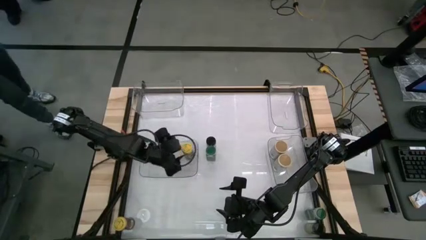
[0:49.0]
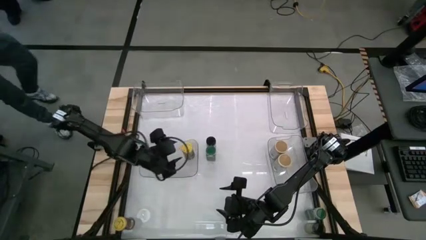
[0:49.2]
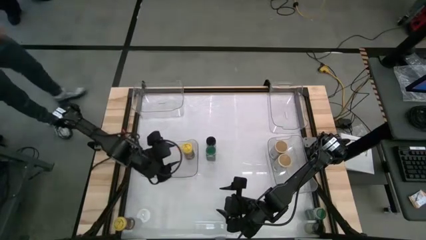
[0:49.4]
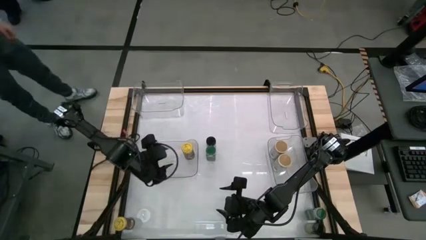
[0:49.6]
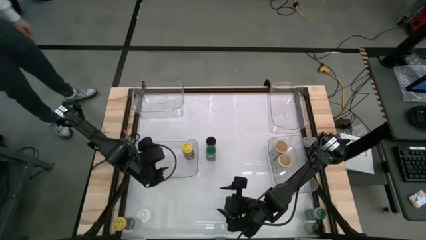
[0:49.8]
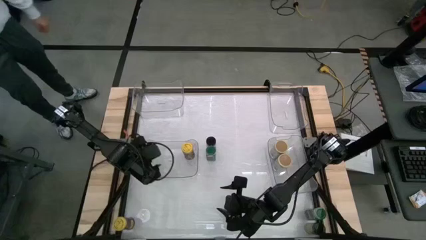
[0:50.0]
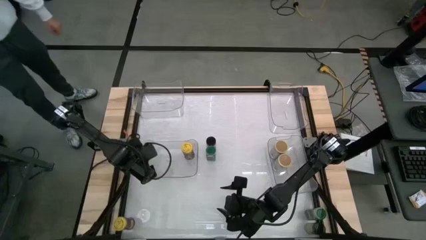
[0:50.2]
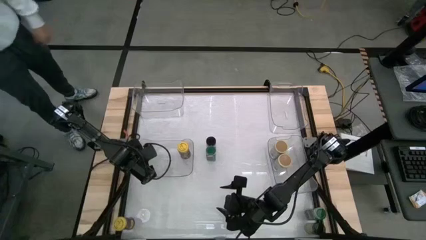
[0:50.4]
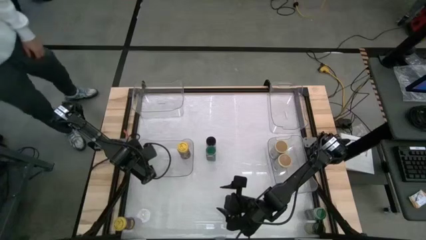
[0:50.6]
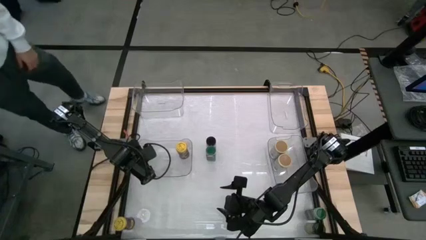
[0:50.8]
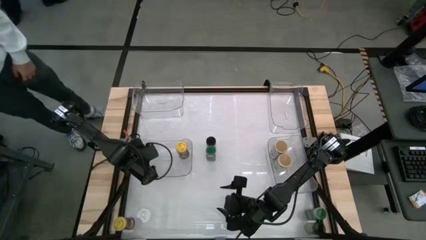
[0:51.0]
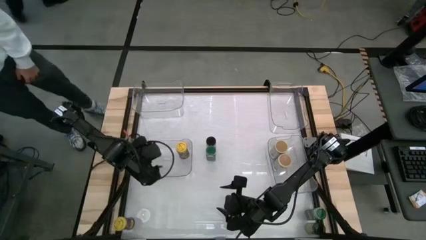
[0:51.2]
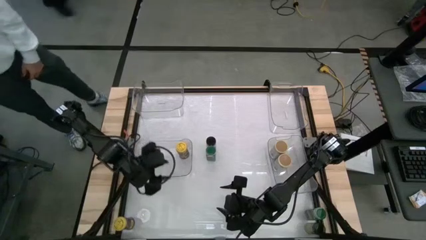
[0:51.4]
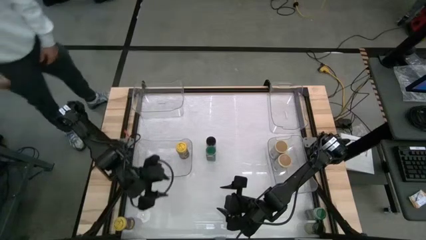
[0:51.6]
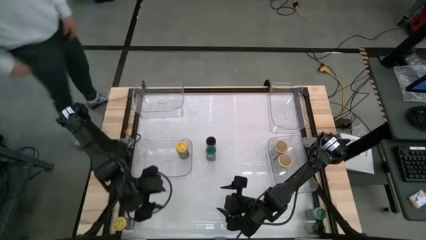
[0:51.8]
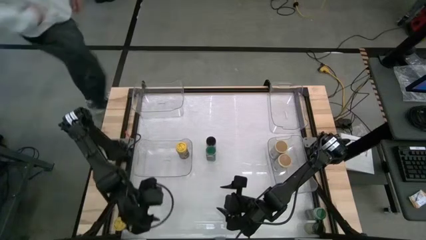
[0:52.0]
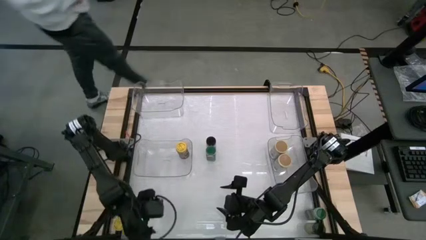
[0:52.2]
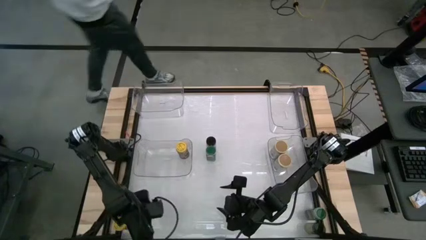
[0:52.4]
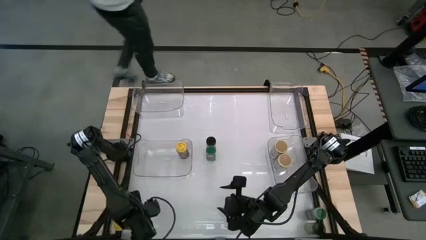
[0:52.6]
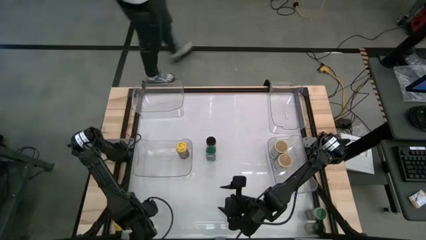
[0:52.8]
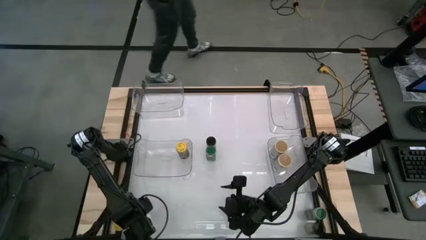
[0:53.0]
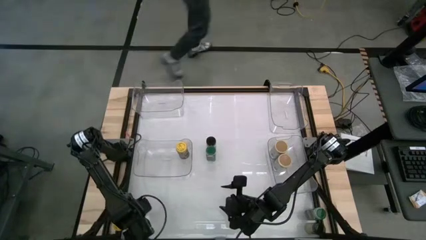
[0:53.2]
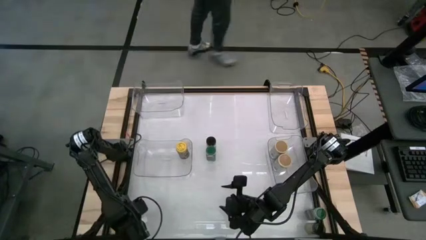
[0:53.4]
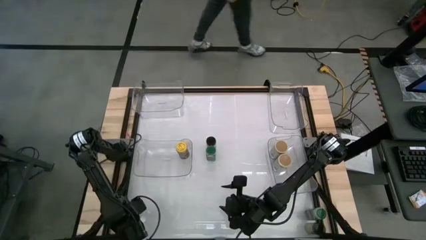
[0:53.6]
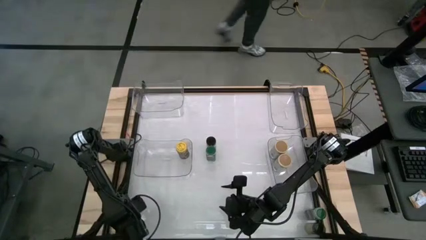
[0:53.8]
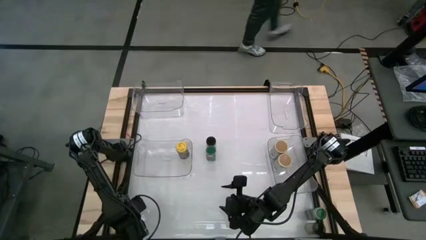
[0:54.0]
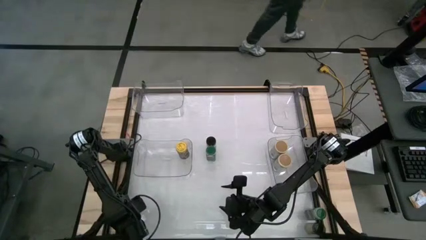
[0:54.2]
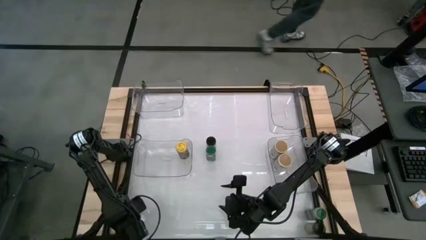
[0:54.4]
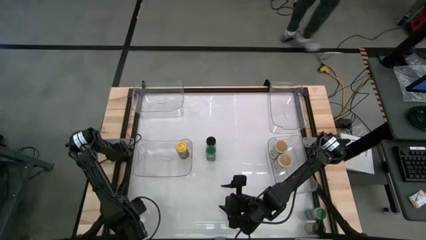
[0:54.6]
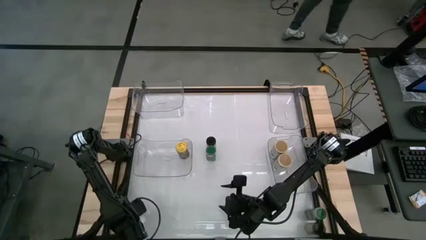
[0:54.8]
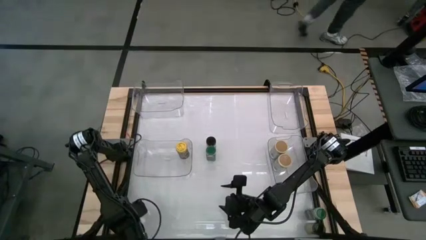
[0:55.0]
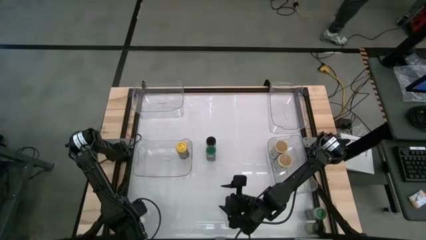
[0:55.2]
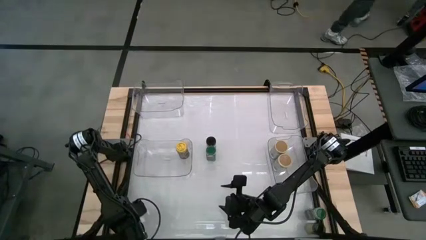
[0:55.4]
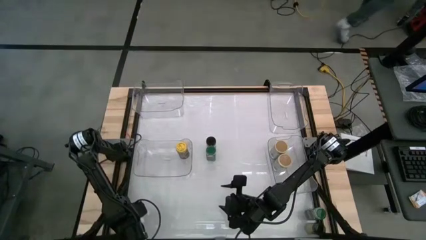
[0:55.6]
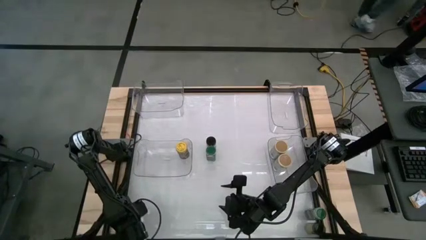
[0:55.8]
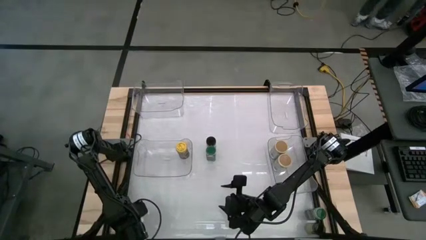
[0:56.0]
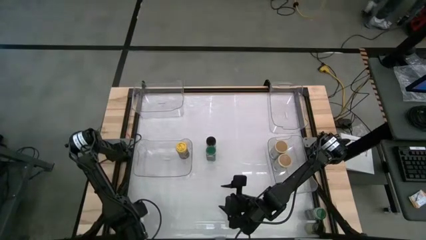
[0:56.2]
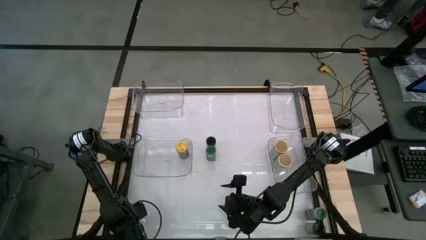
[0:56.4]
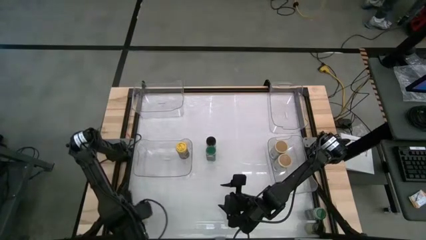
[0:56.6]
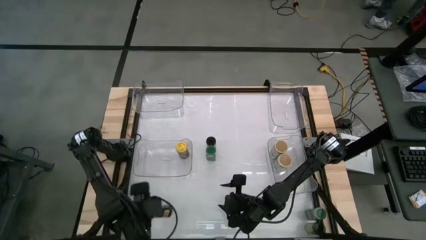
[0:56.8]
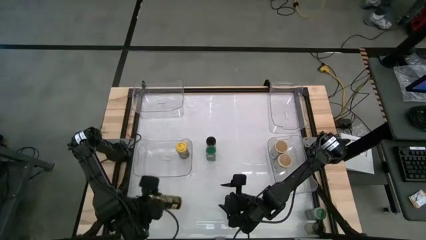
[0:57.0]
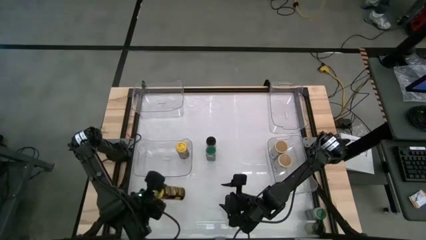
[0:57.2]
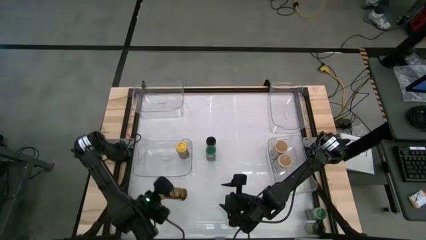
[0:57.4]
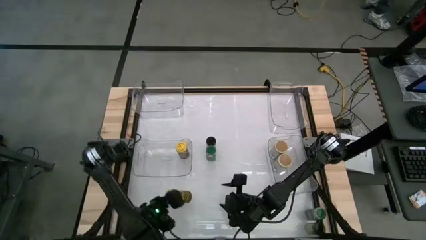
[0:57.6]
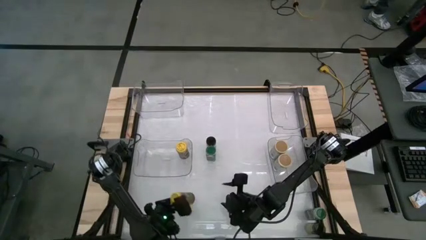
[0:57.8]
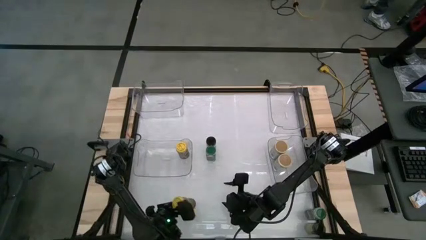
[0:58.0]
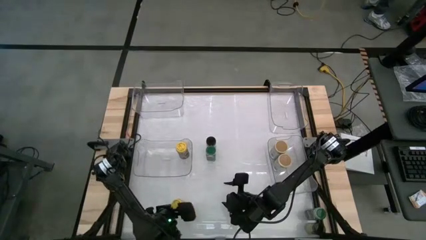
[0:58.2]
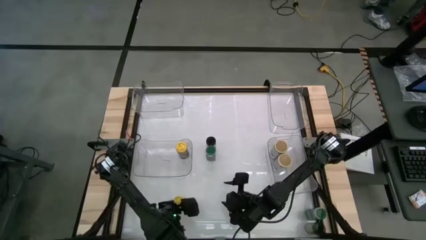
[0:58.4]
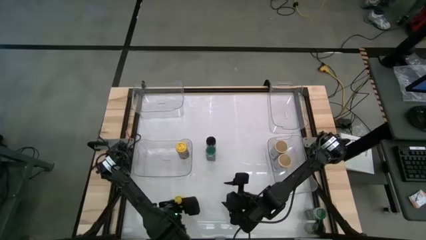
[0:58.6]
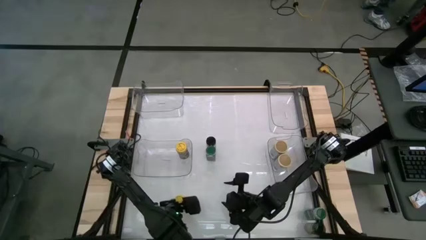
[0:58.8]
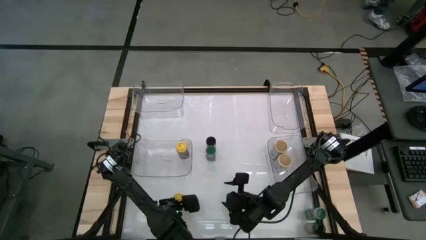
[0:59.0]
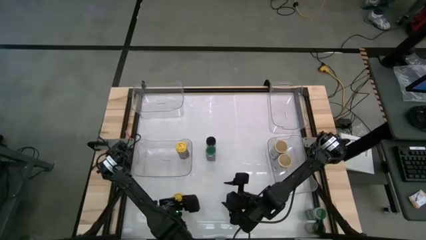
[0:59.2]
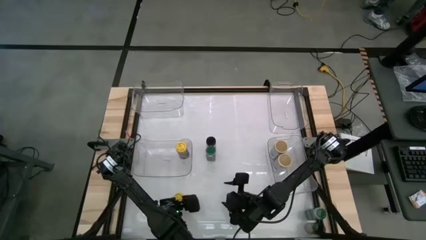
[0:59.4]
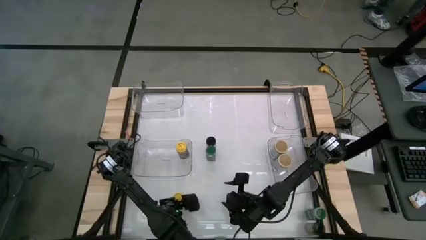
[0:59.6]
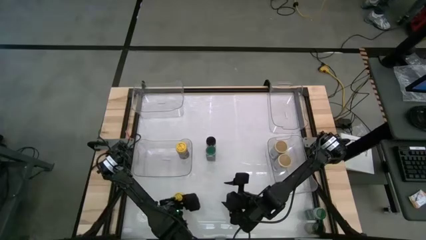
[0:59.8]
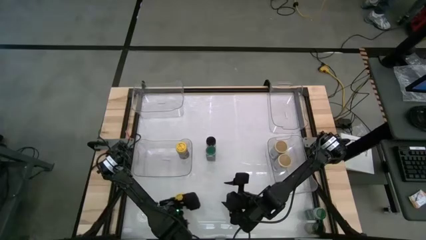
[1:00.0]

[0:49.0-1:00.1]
Task: Sort spices by type
Put the yellow spice bottle into the bottom left transparent bin

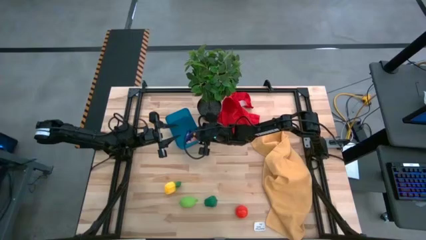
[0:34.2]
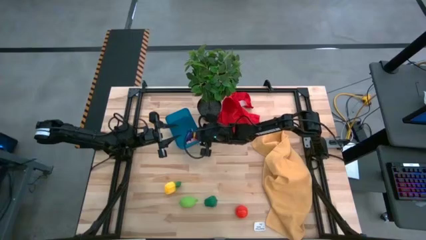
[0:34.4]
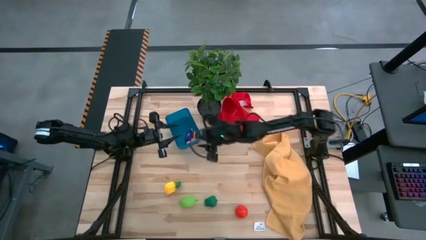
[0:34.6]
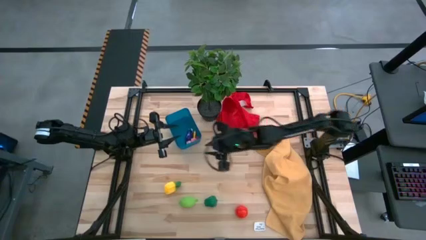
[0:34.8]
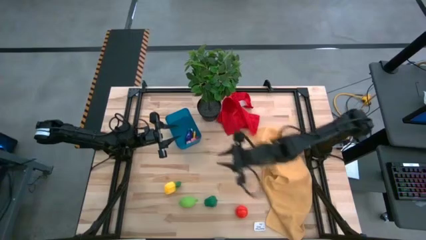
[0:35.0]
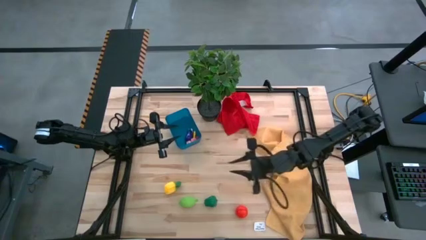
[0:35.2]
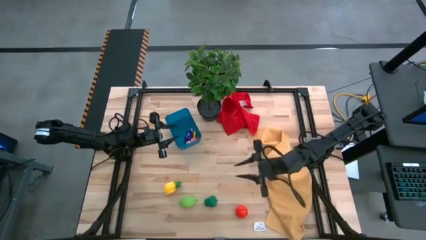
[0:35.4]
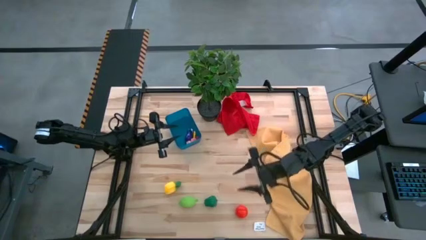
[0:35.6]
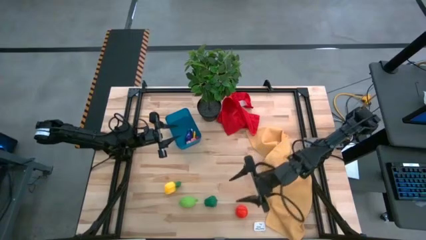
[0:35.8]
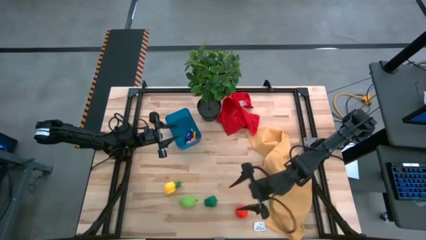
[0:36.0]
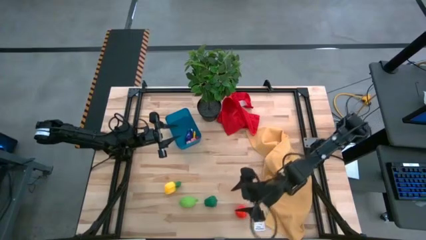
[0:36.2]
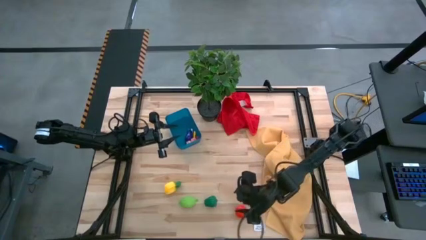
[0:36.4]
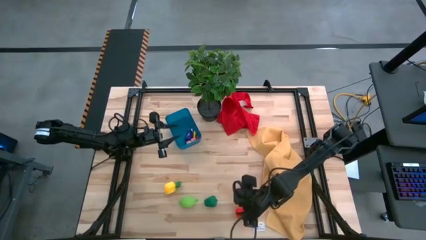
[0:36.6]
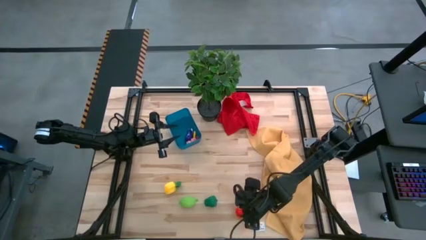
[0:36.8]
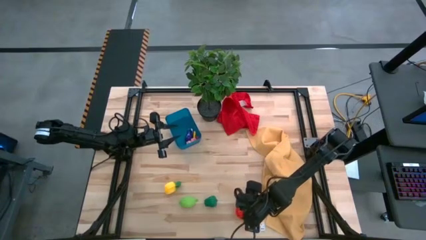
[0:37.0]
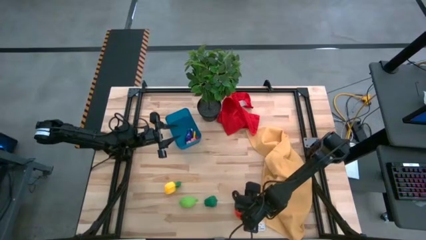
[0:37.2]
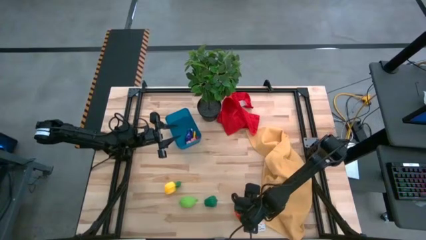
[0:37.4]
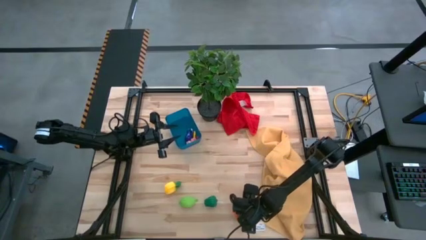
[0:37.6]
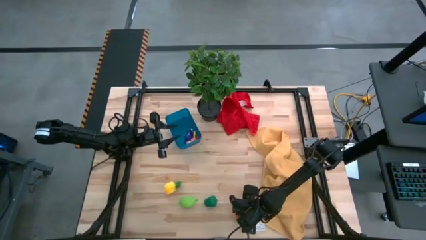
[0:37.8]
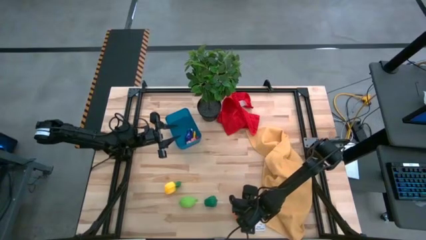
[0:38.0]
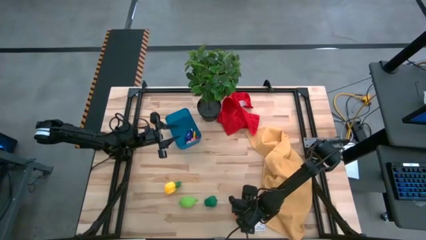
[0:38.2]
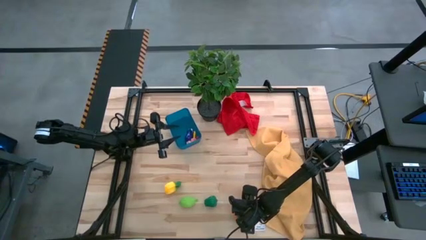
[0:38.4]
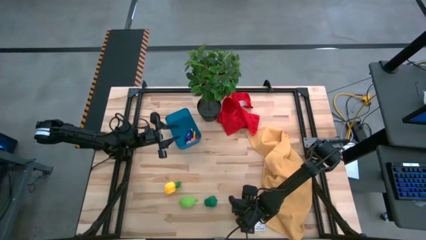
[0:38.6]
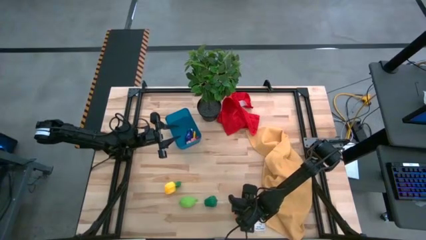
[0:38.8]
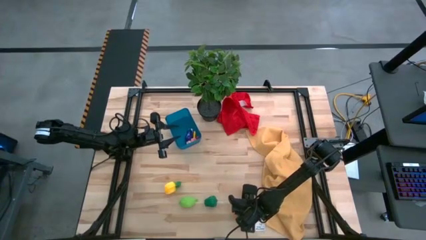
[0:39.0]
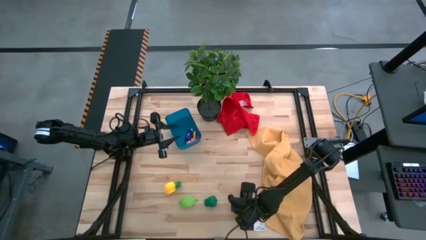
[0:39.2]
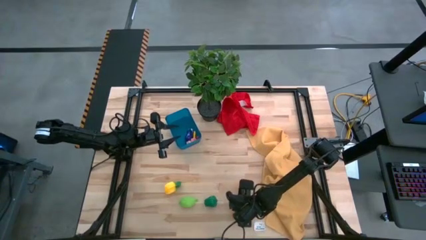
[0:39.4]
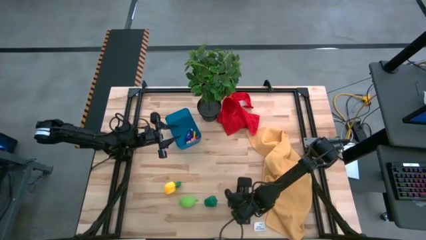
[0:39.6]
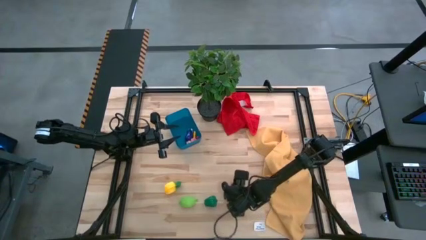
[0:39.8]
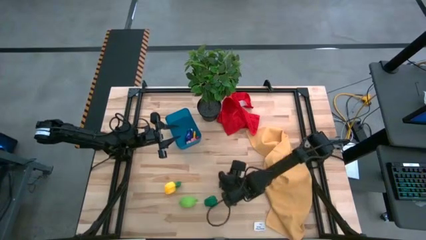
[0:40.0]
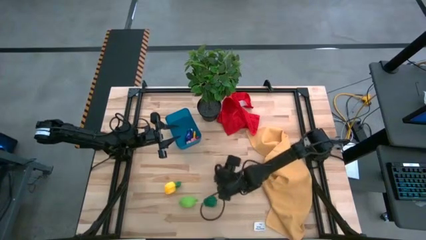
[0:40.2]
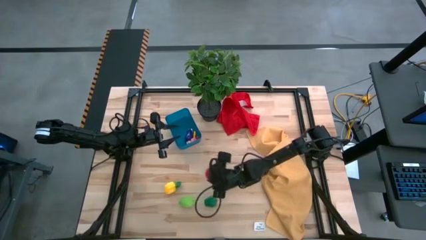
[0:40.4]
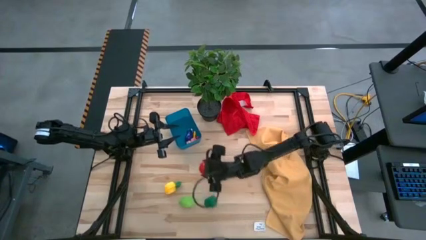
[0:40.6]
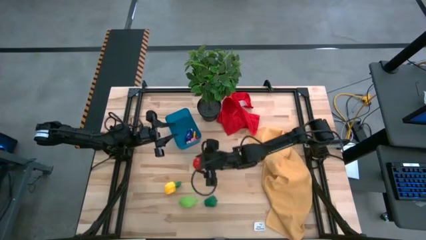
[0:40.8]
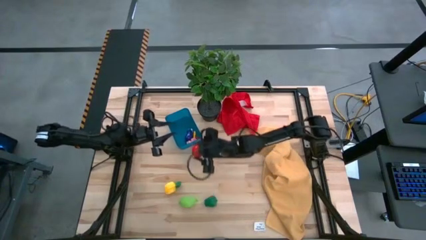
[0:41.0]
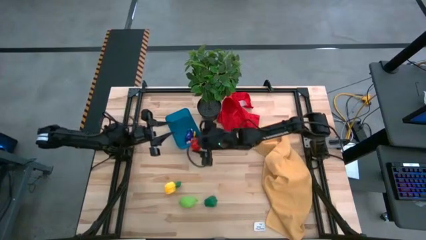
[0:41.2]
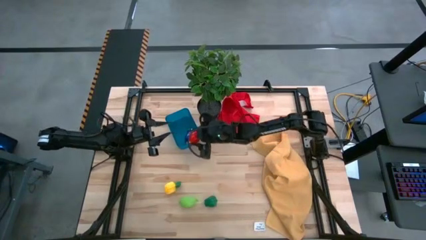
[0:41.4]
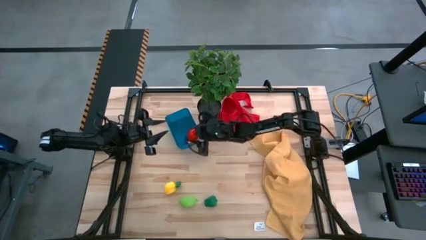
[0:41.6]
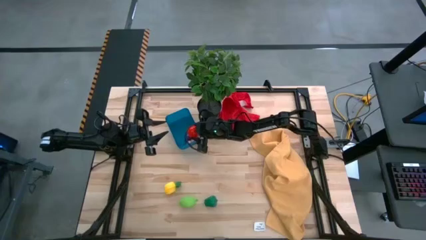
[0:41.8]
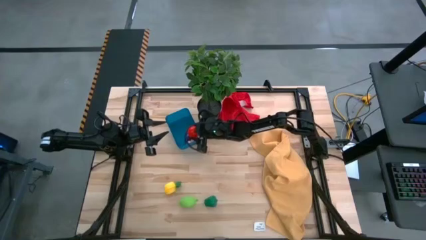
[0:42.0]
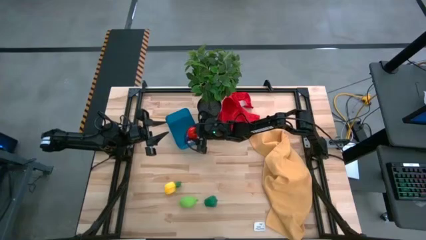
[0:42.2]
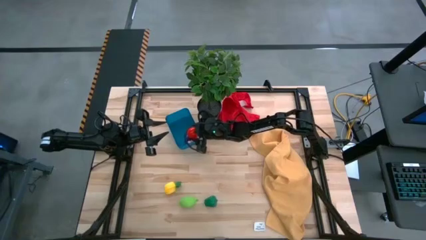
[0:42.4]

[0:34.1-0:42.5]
Task: Pick and placing Produce into tupperware
Put the red tomato into the blue bin
